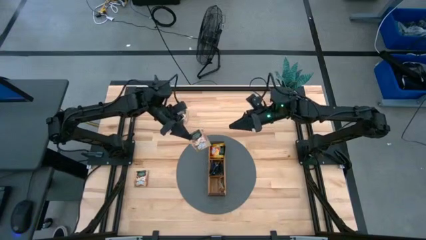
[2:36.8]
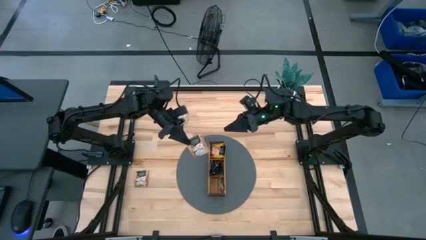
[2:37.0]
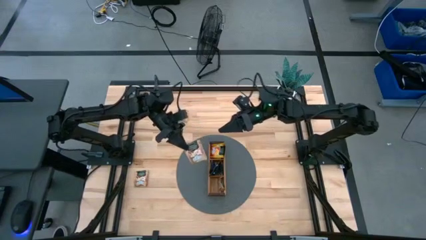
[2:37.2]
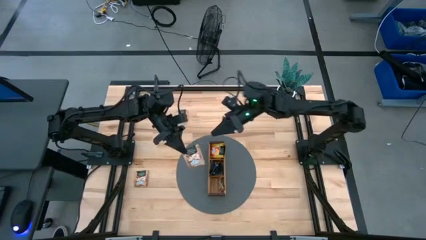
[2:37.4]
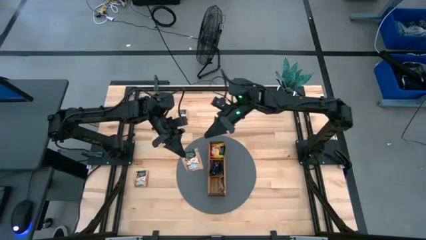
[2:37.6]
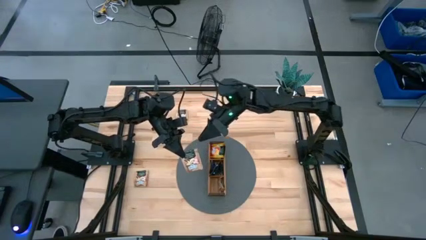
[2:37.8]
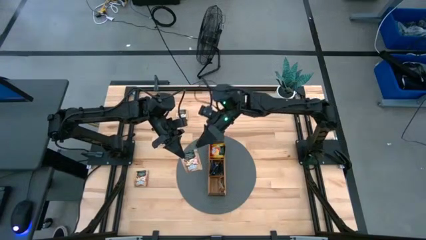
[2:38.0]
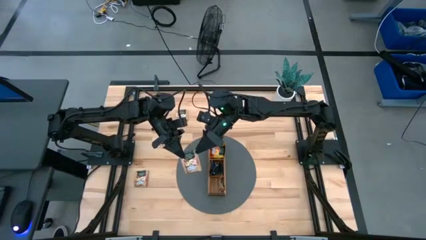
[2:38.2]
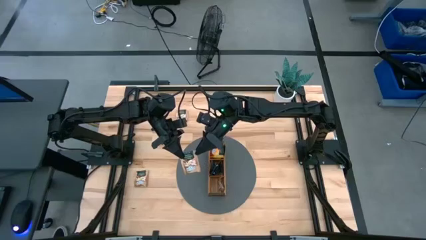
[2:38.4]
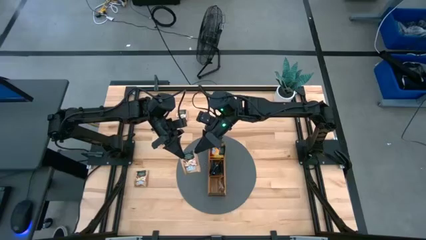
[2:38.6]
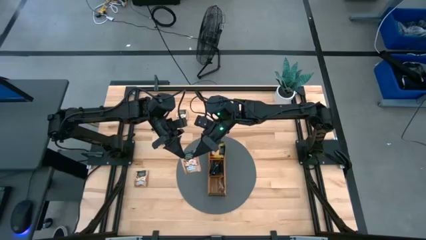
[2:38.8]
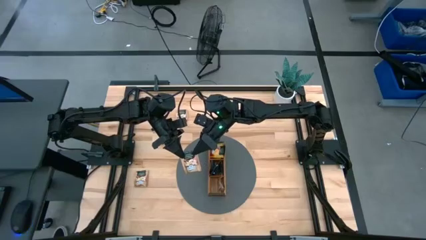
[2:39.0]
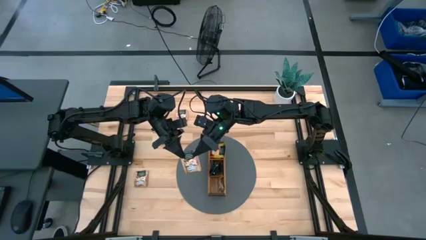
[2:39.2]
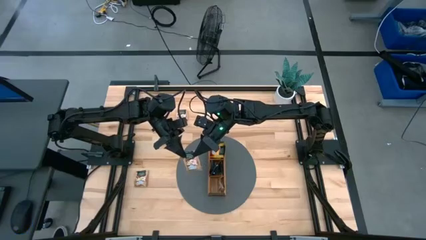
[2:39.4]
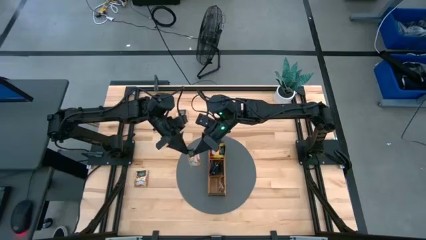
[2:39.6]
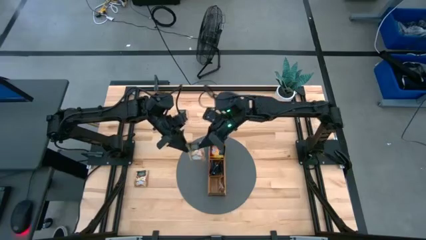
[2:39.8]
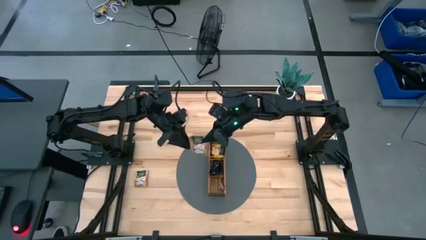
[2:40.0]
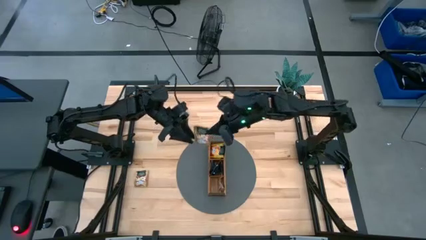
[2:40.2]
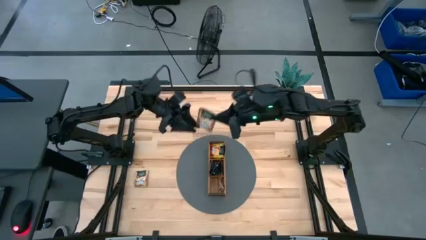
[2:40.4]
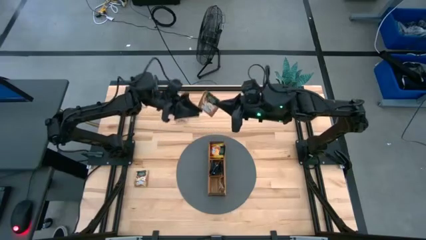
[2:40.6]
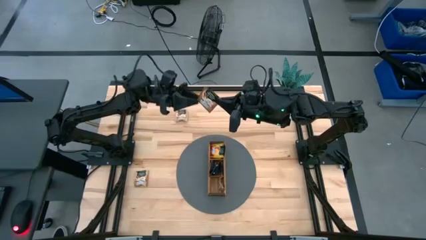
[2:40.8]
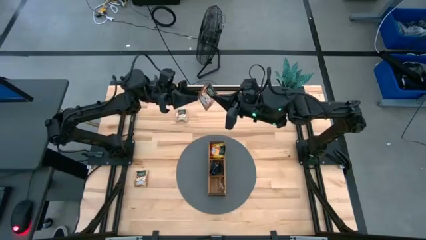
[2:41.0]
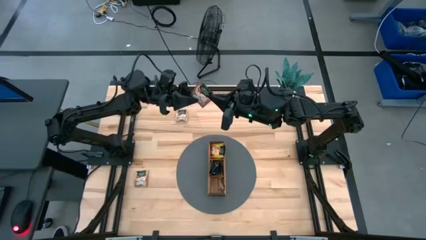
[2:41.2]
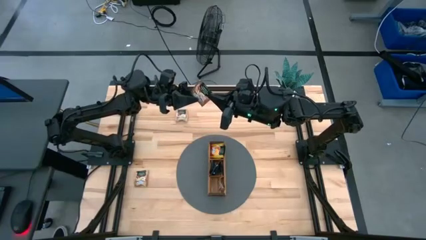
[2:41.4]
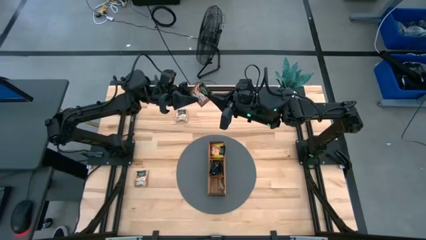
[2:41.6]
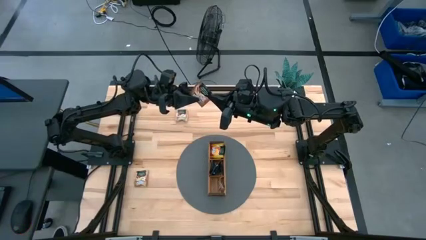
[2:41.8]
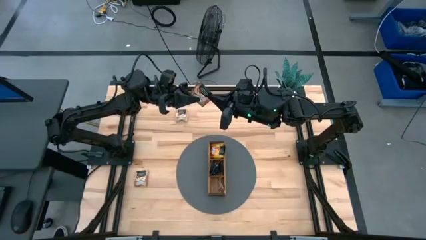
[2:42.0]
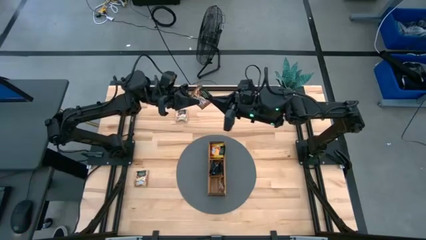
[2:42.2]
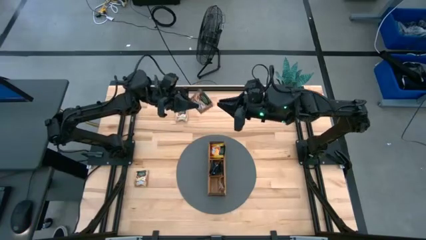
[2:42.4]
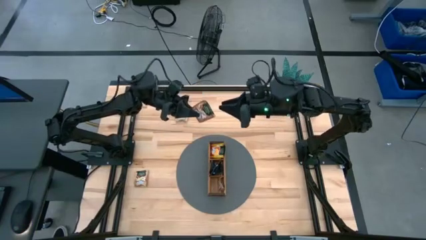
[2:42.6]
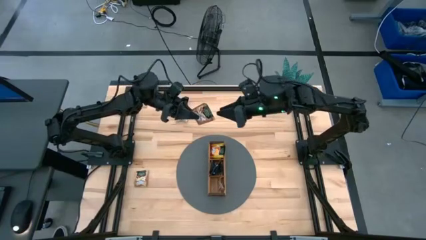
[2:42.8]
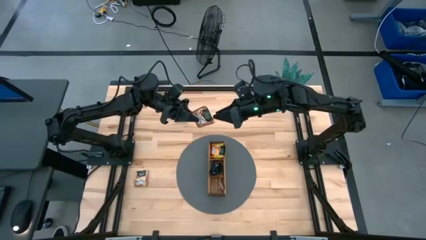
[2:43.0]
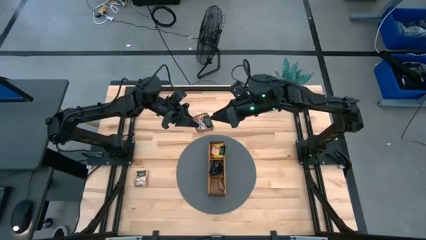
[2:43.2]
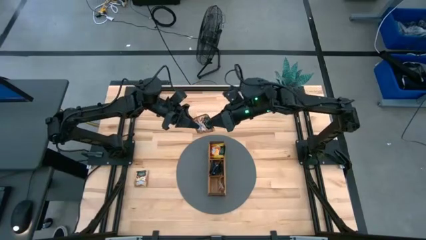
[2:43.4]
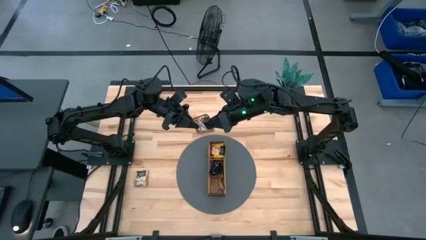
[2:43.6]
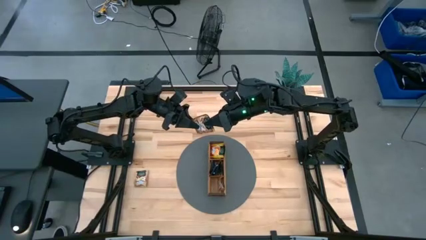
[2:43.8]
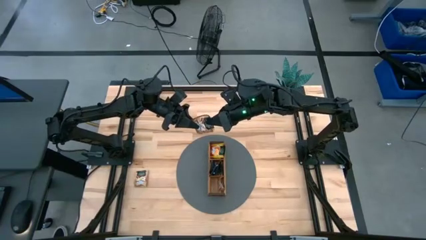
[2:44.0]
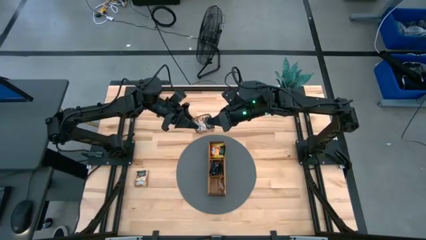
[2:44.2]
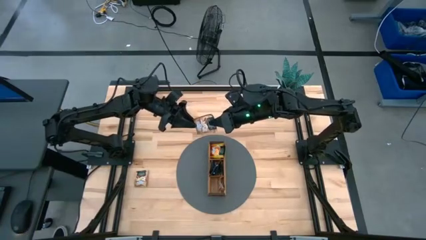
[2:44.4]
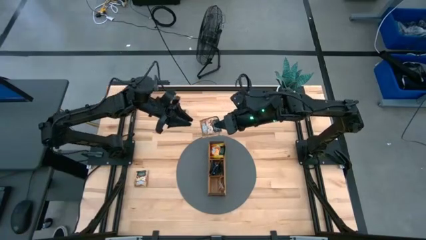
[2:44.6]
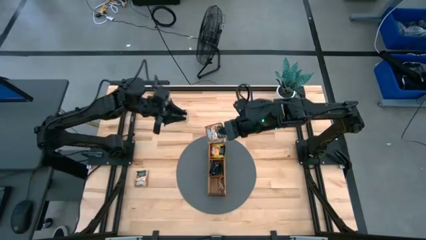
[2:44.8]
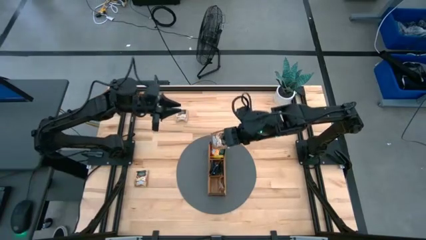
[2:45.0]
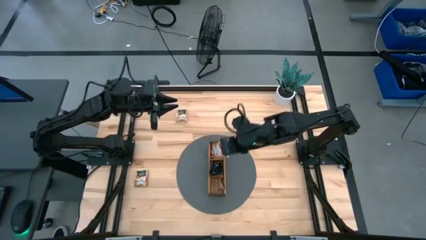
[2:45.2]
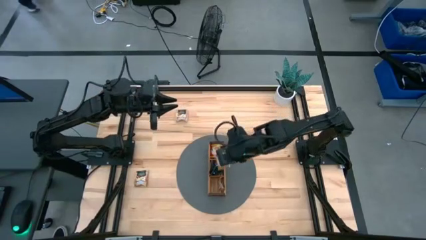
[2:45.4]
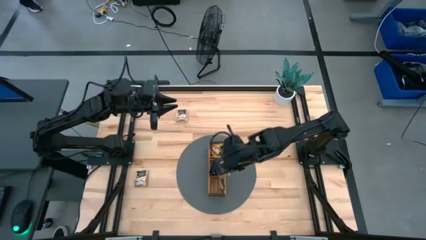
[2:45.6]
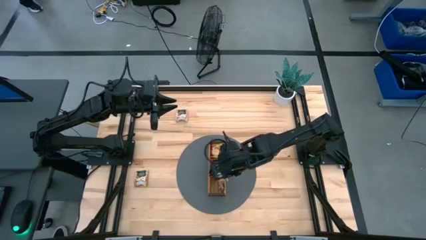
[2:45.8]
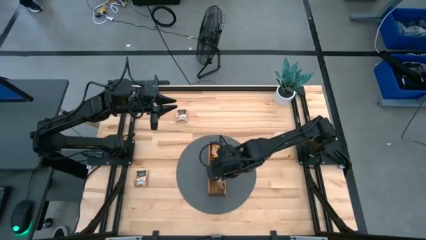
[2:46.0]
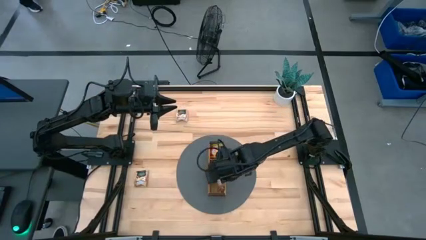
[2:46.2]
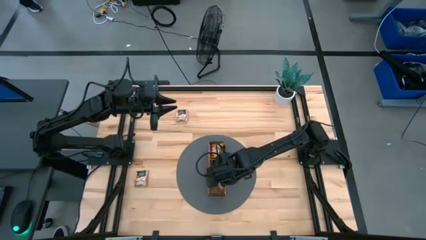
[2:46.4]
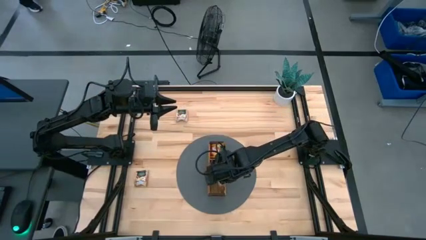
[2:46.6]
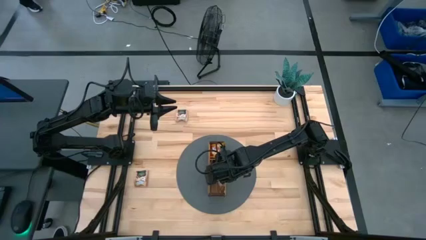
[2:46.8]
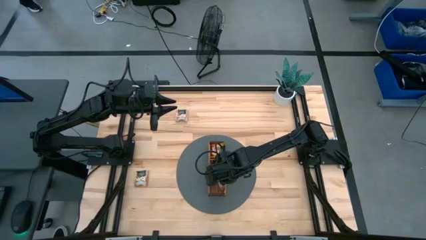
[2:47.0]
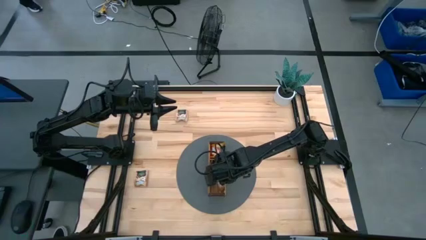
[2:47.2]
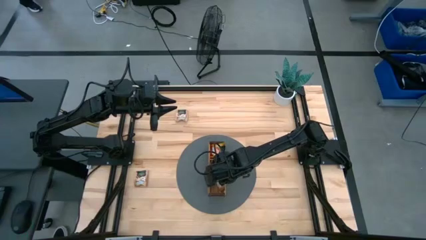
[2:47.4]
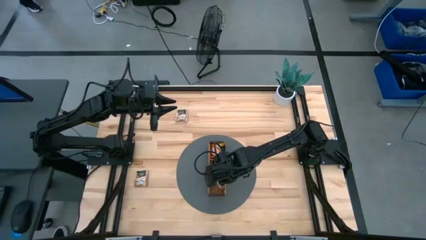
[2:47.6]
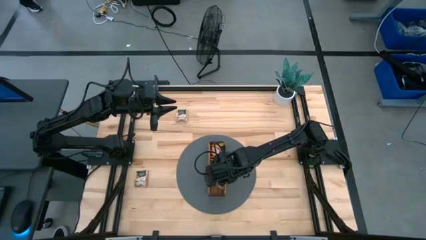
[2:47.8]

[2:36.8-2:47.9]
Task: Pick & Place Tea
Put the brown tea bag into the bottom section of the wooden organizer

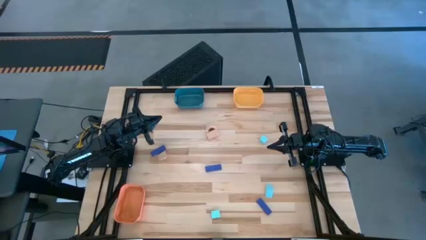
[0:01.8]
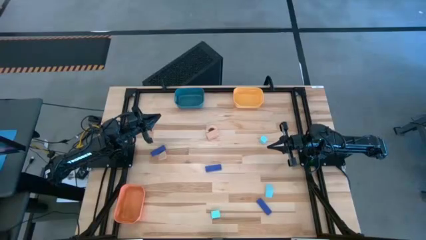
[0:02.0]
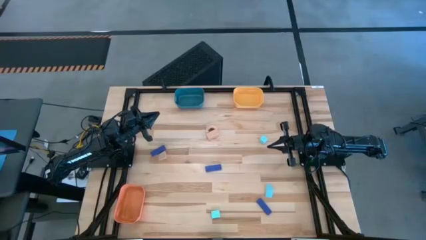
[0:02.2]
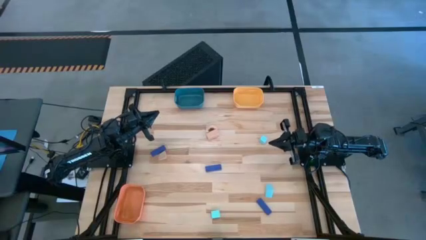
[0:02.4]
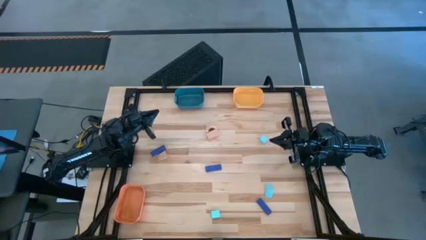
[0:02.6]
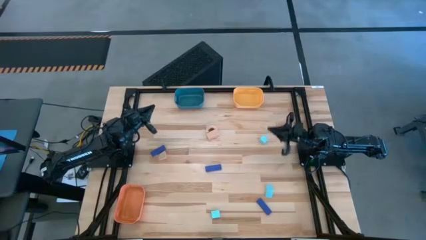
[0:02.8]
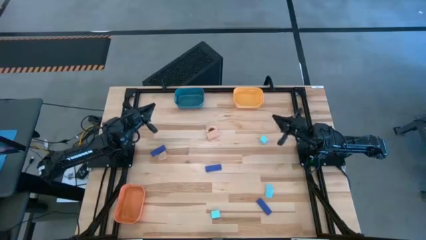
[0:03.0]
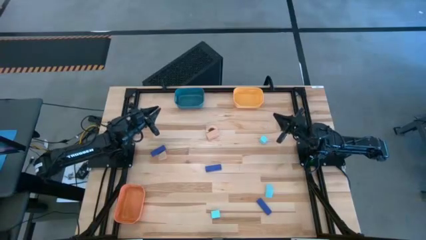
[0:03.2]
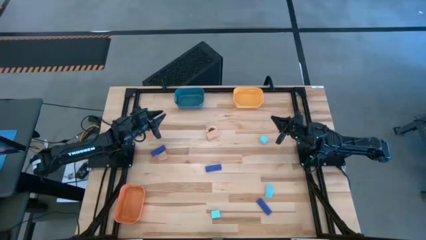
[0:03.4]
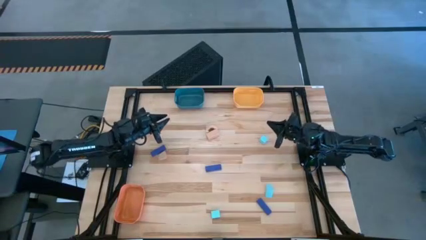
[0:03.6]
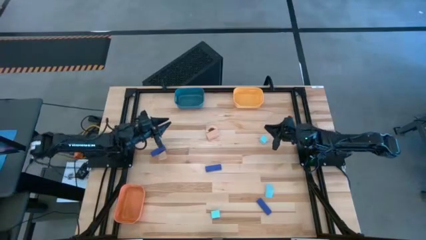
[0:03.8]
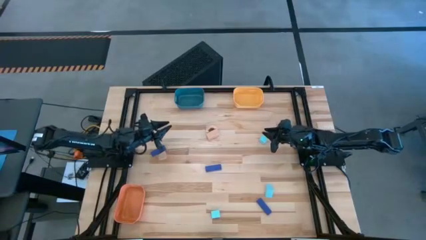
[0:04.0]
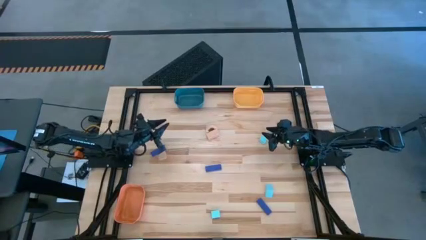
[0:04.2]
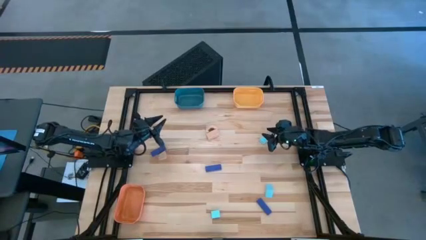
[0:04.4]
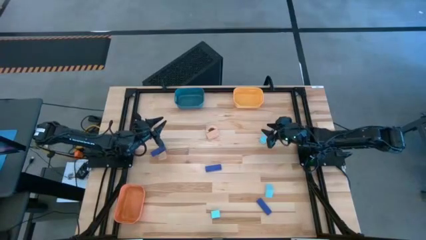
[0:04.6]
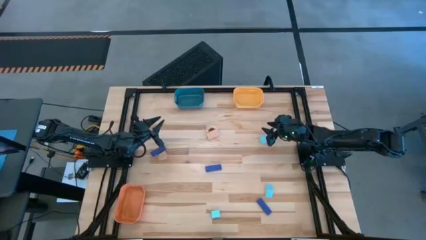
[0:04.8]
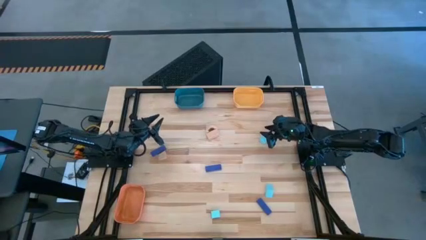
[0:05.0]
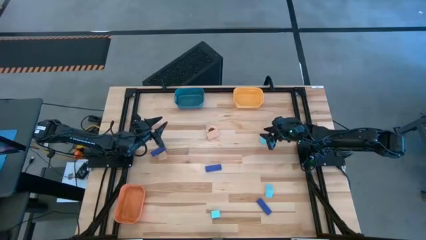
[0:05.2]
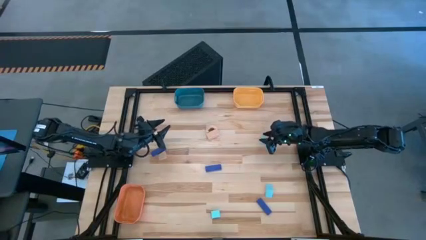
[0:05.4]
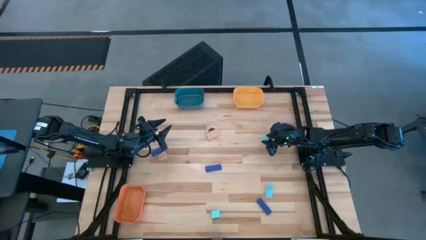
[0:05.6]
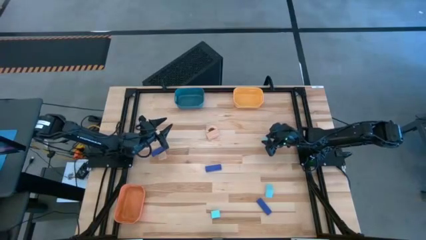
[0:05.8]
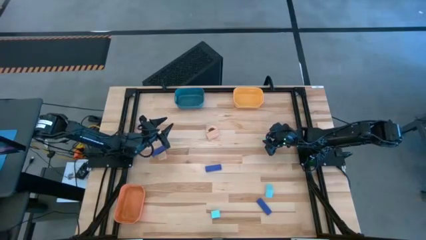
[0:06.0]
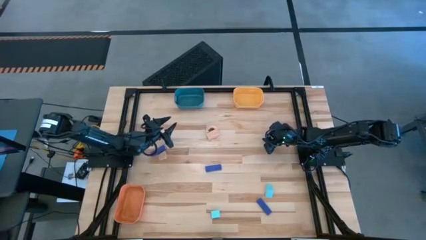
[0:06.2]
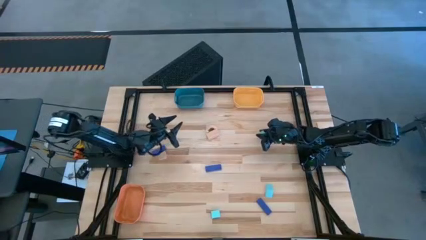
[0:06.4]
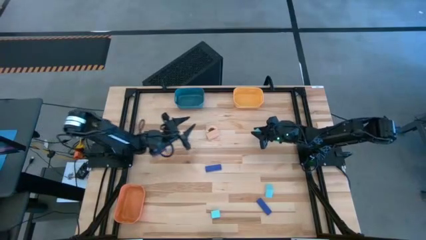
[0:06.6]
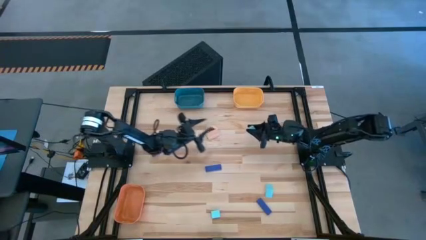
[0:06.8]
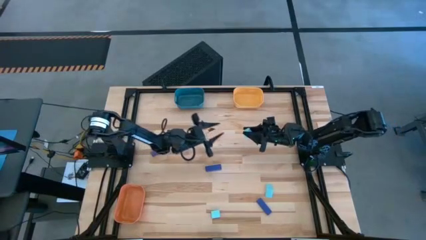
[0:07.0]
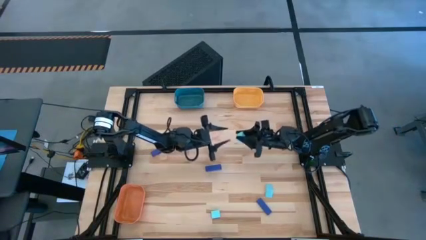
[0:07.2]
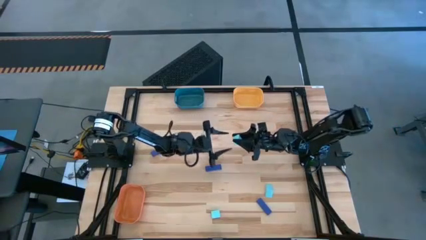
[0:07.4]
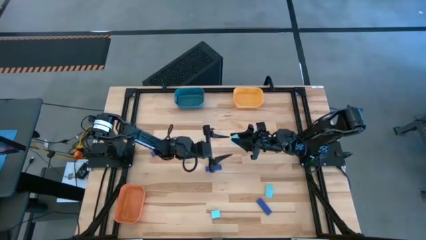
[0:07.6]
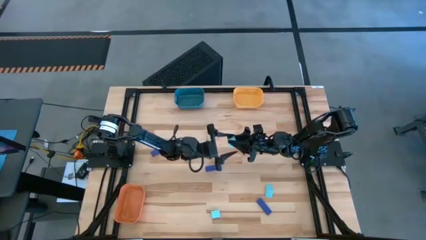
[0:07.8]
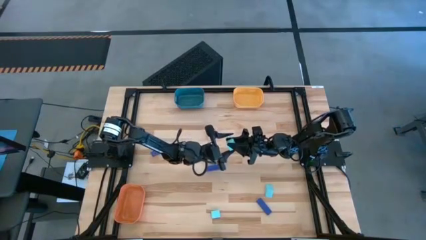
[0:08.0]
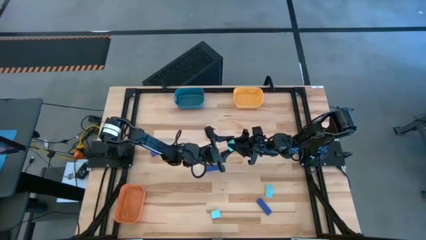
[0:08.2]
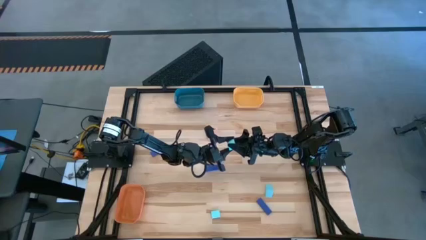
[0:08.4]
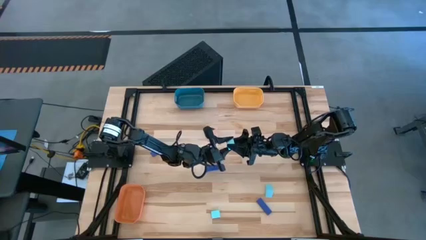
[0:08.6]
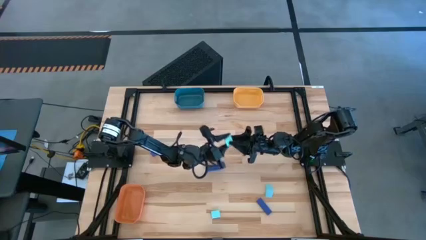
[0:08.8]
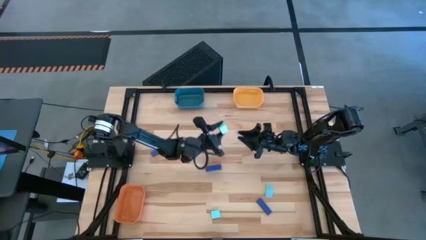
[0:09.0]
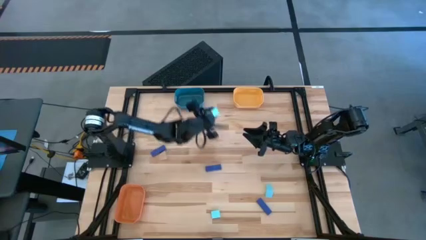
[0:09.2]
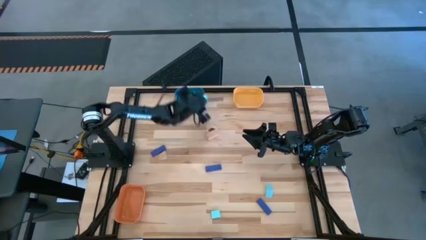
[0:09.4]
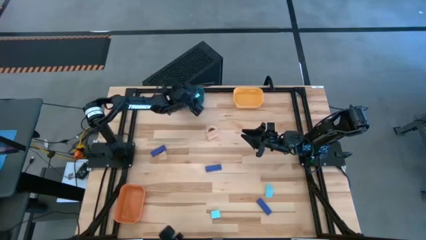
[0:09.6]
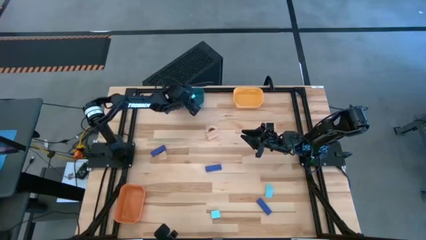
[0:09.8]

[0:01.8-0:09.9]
Task: Sort & place blocks by color
Put the top right light blue block into the dark blue bin
